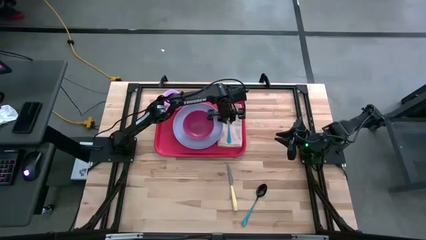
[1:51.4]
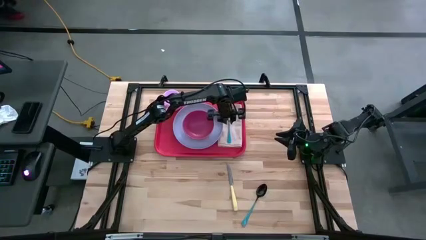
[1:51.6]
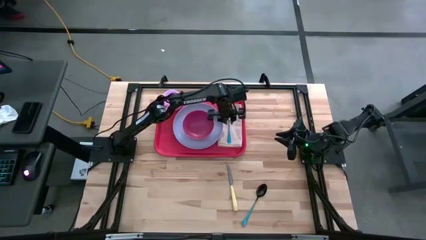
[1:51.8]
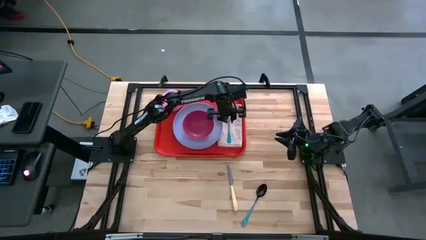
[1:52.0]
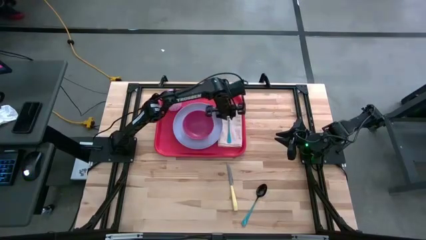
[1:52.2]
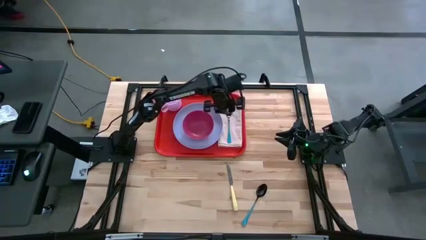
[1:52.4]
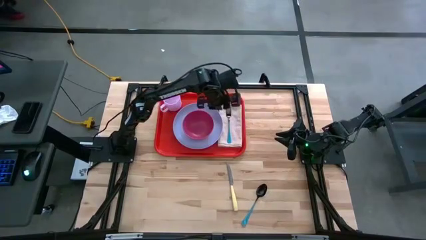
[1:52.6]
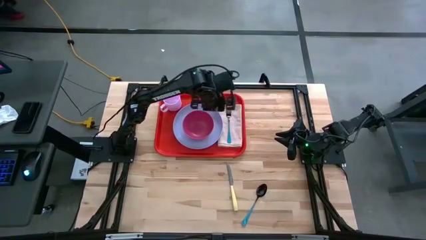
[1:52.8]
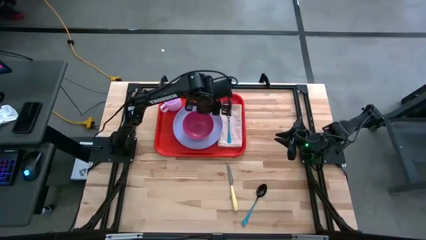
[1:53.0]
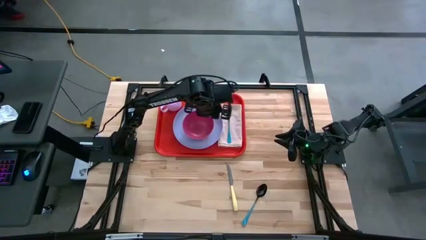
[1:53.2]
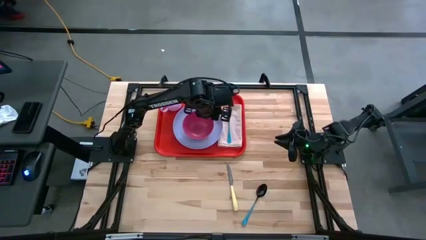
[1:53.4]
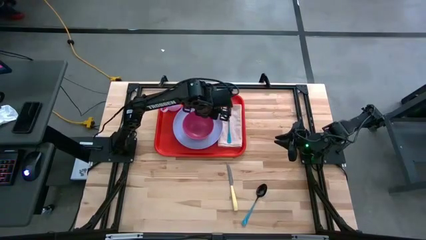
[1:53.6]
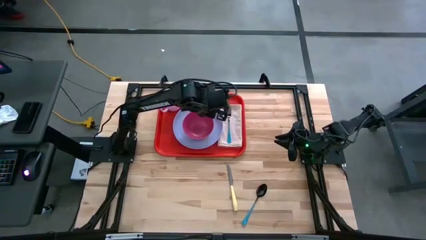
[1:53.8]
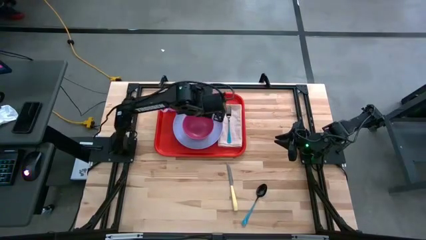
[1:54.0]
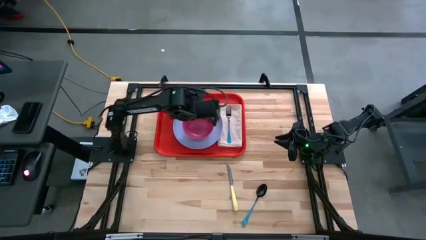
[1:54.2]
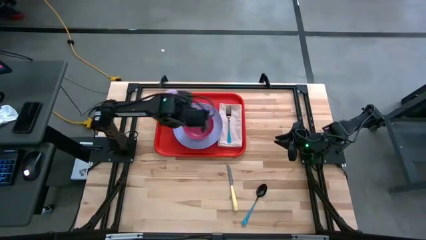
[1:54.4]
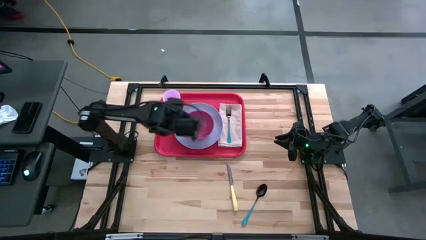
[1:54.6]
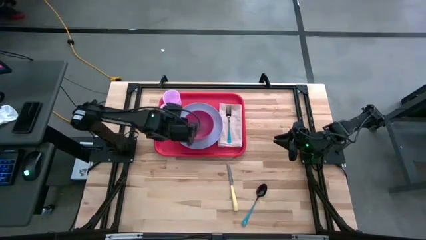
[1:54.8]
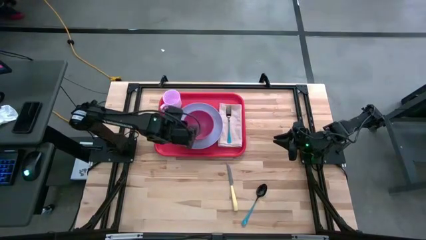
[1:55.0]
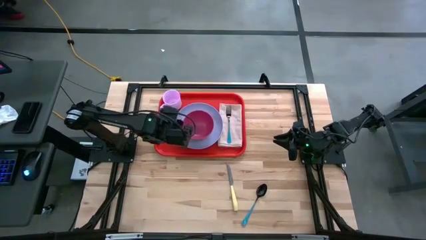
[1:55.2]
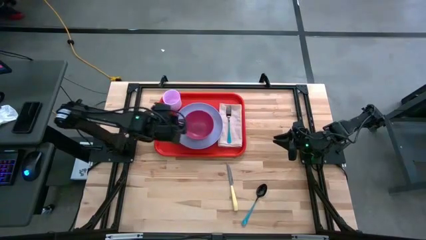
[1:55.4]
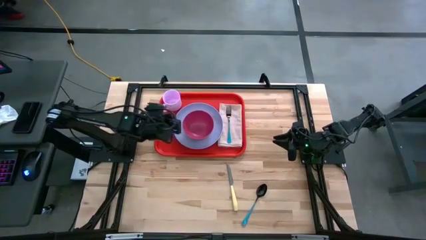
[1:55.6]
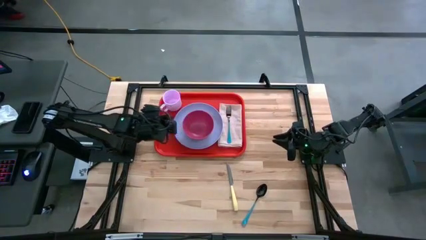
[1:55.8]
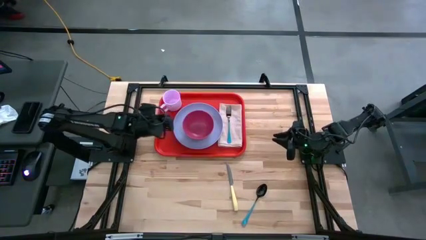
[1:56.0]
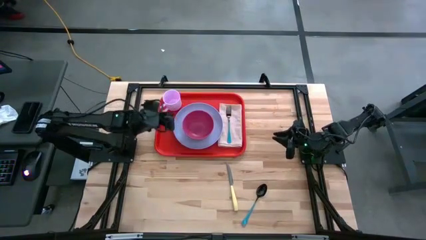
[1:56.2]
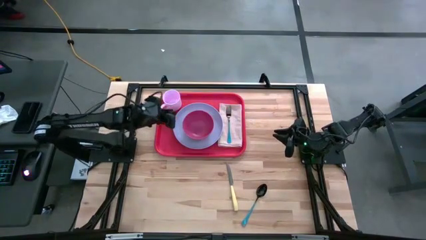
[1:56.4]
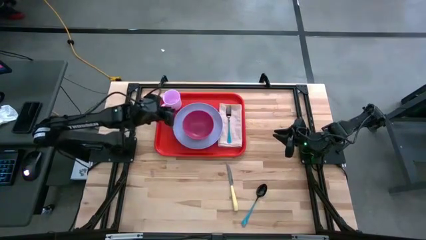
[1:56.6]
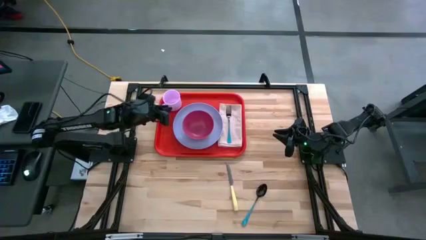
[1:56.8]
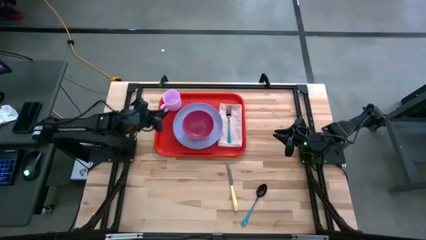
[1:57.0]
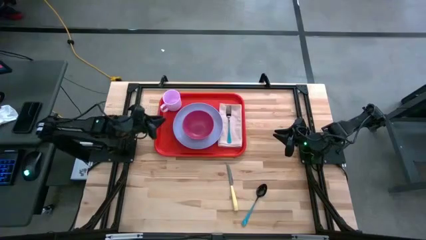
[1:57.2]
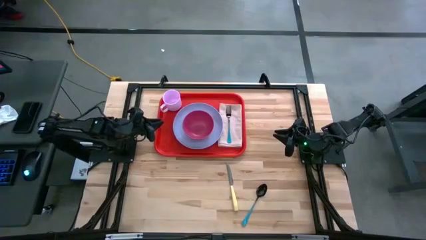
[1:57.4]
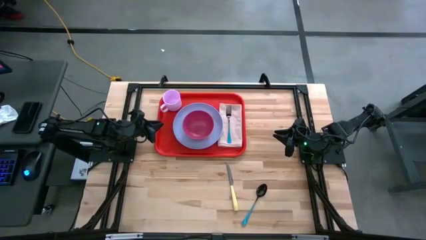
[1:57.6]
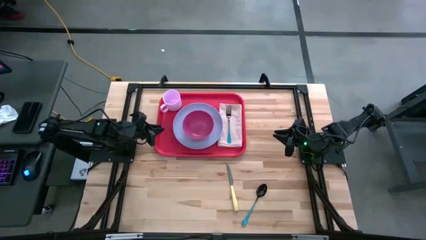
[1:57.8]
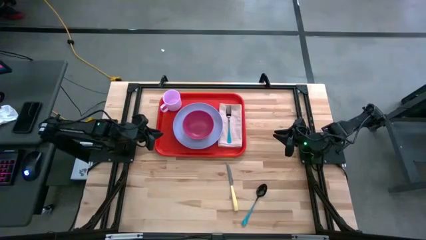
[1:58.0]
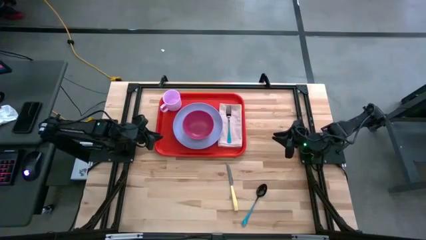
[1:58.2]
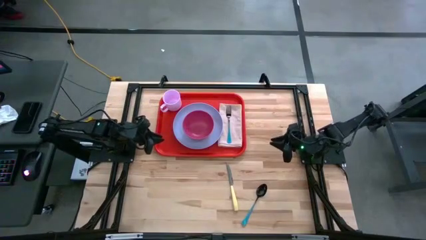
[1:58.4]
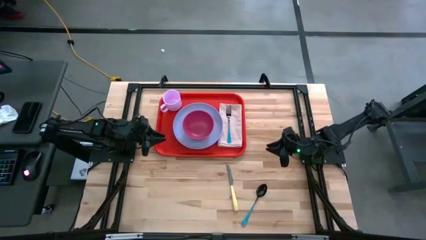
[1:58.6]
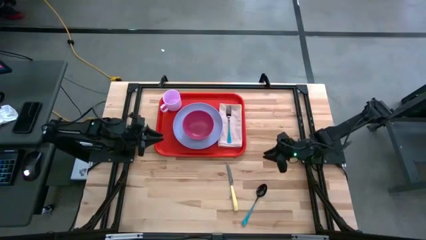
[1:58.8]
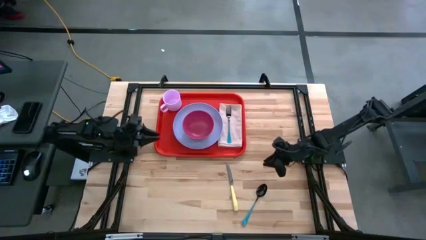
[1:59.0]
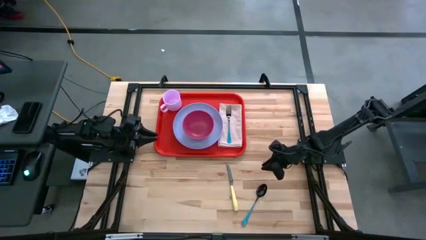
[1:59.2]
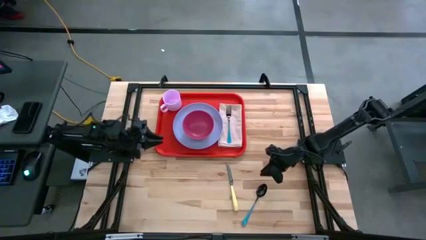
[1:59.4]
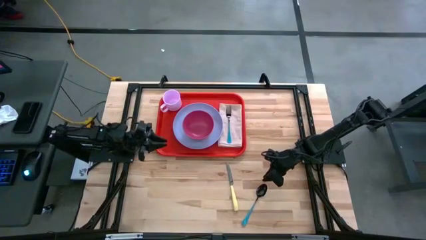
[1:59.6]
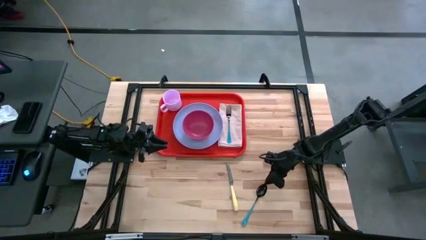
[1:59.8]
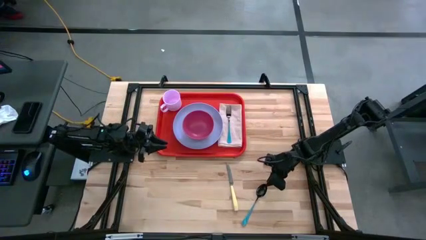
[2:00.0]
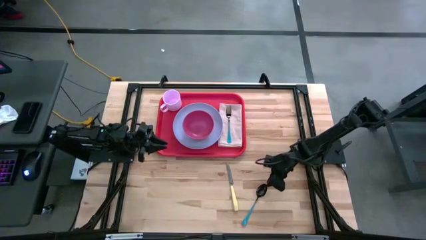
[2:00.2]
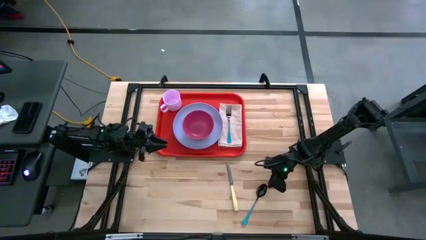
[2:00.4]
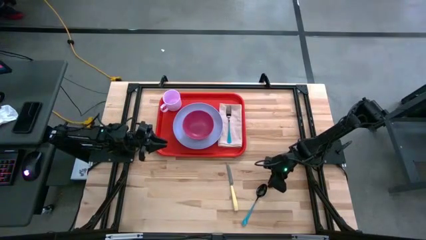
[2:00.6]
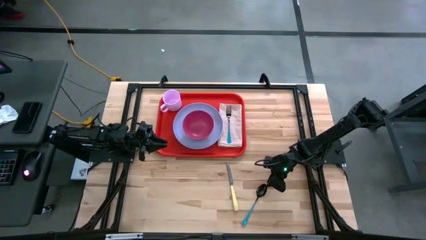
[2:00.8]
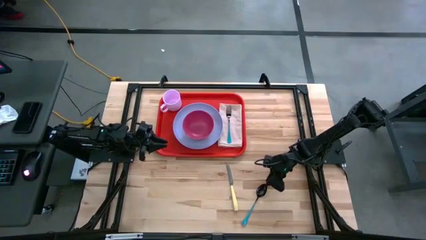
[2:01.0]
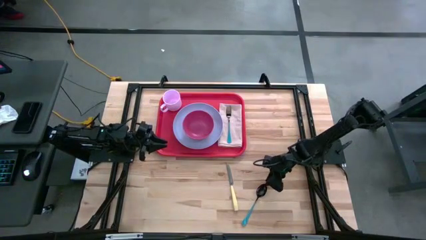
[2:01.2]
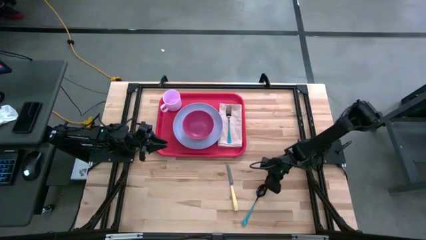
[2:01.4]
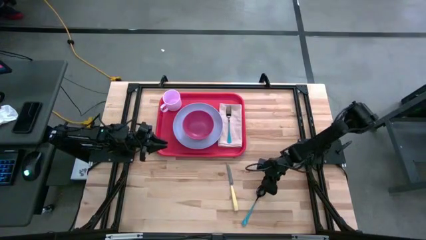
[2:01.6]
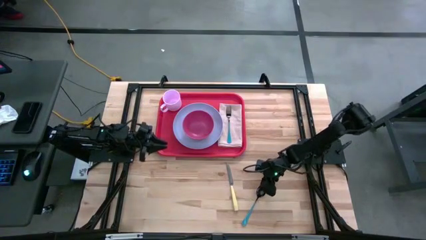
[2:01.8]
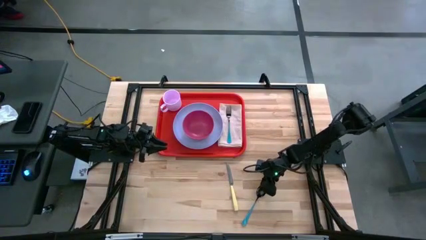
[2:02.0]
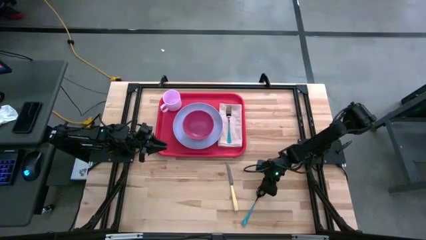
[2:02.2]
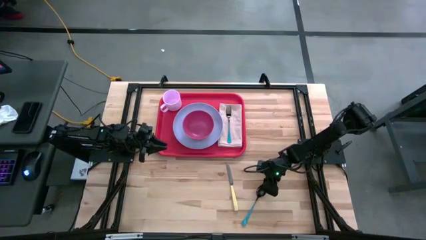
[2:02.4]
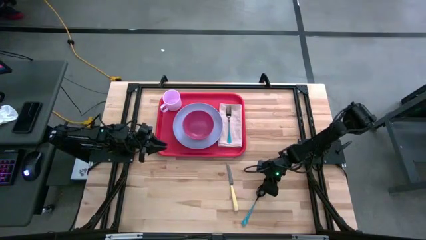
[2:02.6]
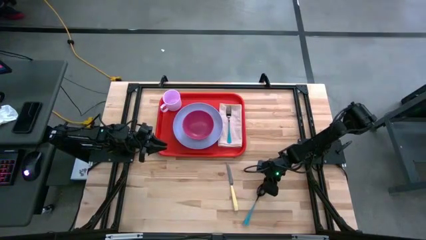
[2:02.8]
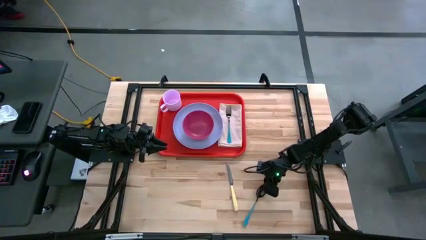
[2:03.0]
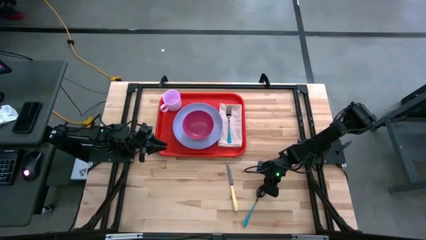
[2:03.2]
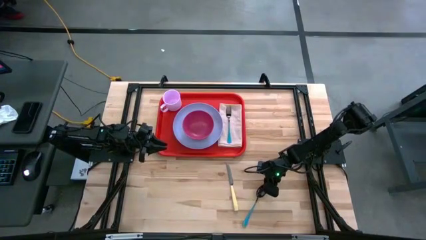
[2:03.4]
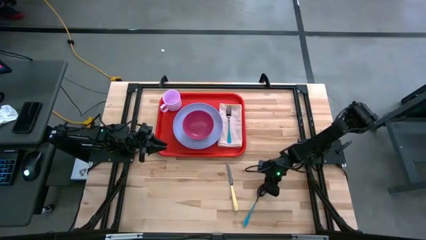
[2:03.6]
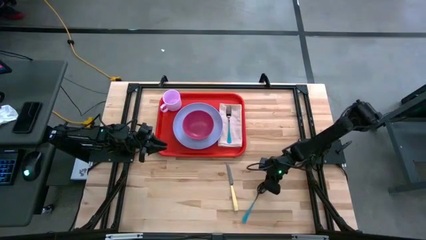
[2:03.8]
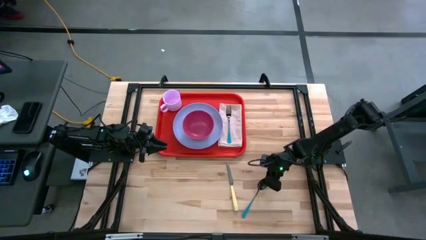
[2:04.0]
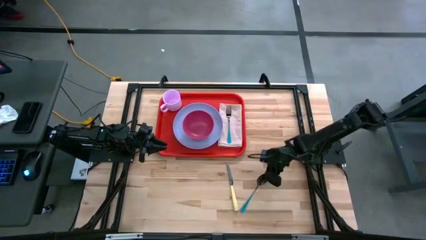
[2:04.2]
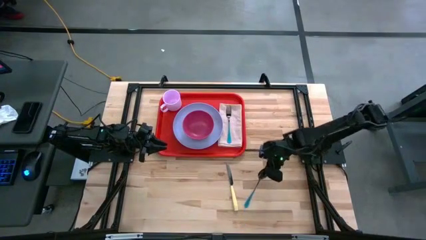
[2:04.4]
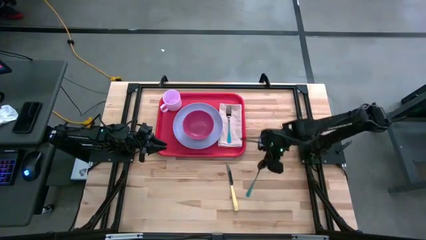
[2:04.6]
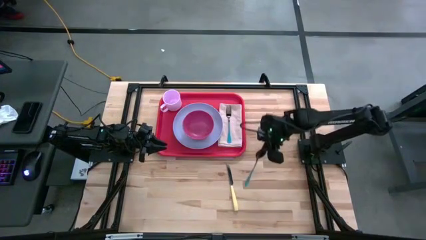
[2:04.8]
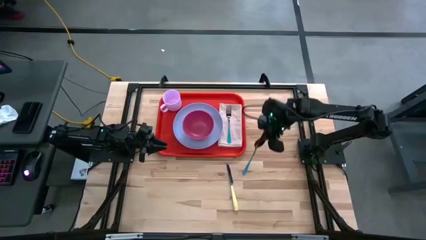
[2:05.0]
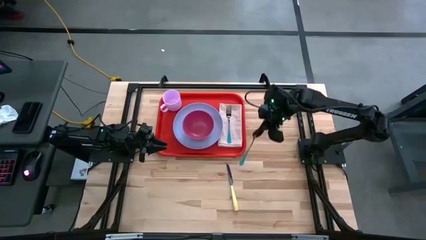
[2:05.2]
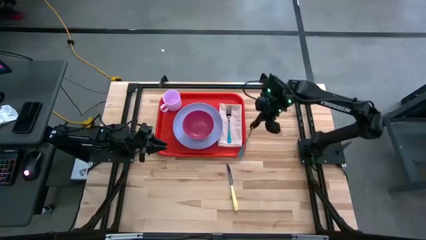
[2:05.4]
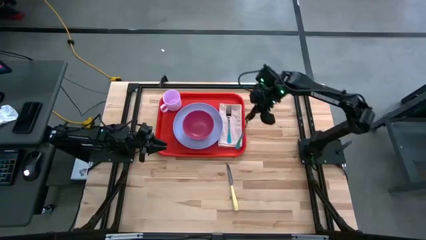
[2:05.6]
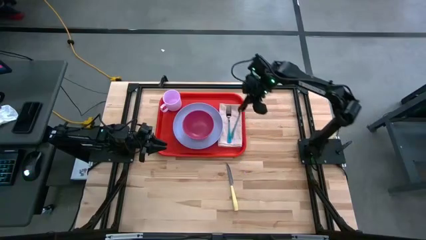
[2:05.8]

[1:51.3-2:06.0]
Task: Set up tray
Put the blue spoon on the white table napkin to the left of the blue fork
